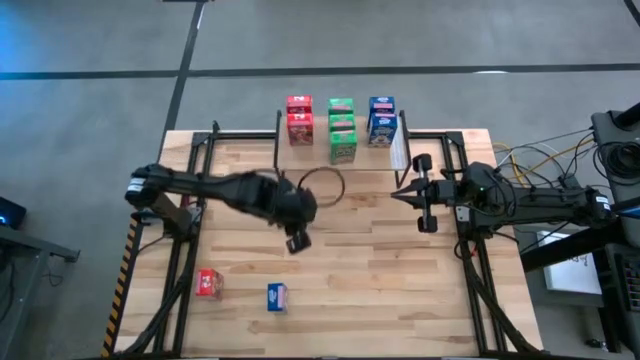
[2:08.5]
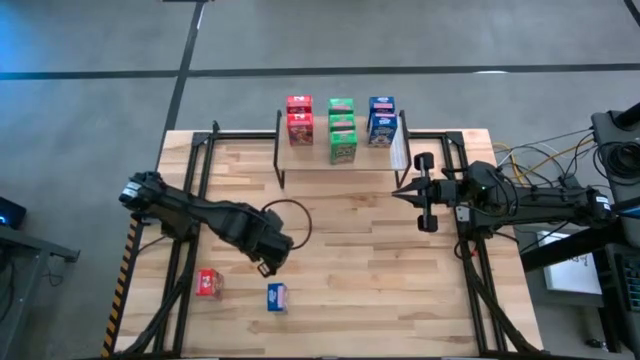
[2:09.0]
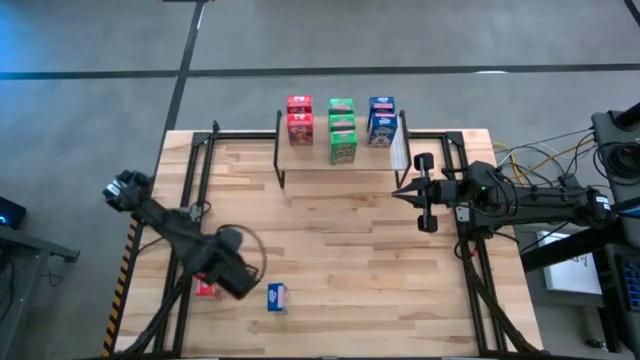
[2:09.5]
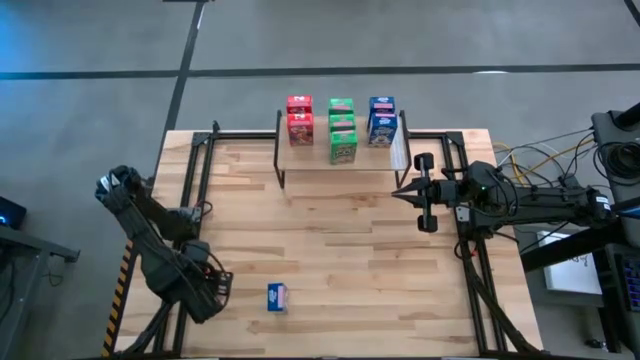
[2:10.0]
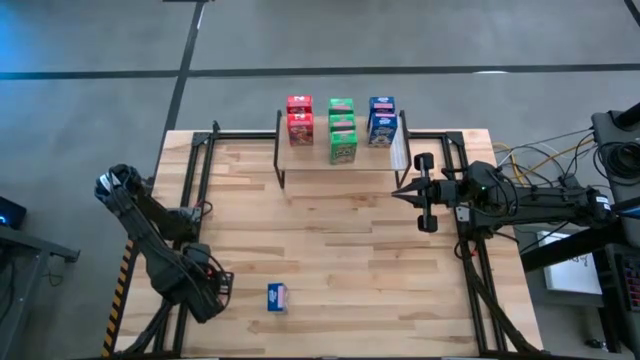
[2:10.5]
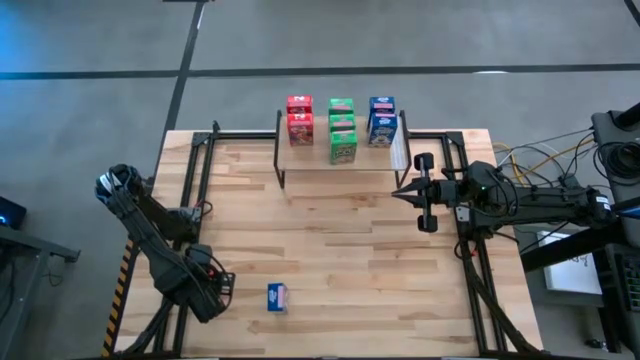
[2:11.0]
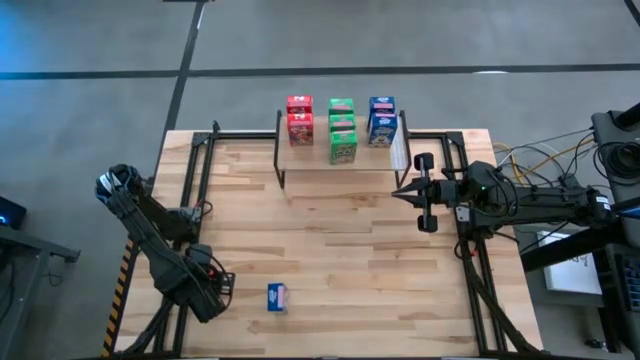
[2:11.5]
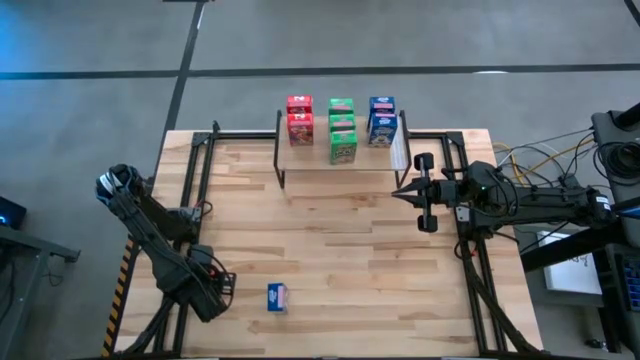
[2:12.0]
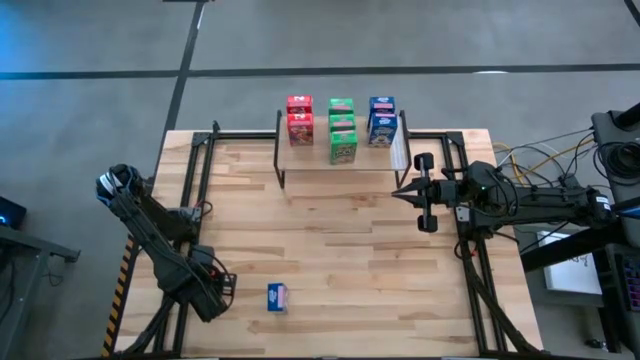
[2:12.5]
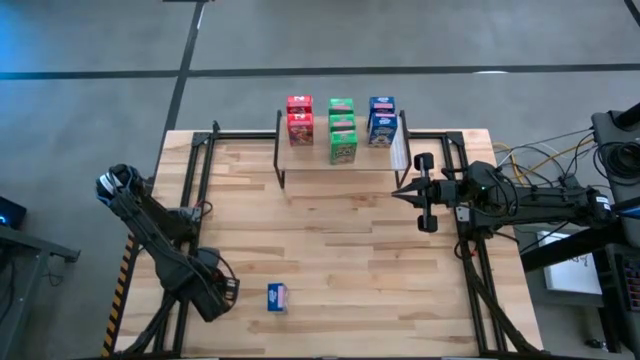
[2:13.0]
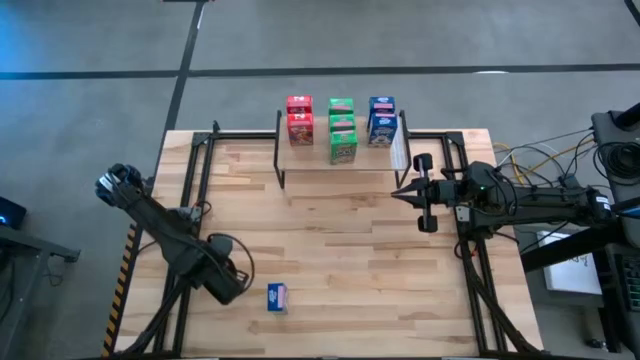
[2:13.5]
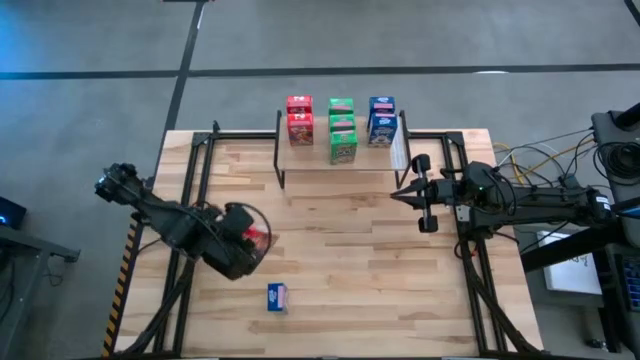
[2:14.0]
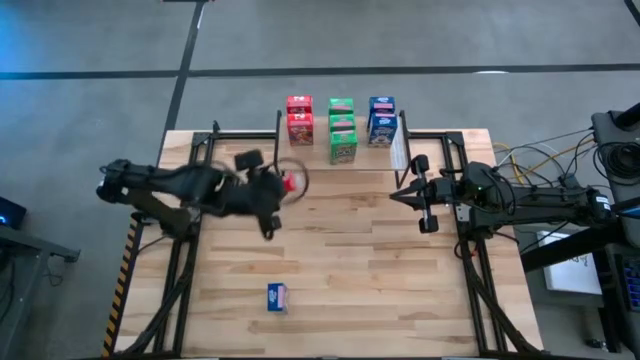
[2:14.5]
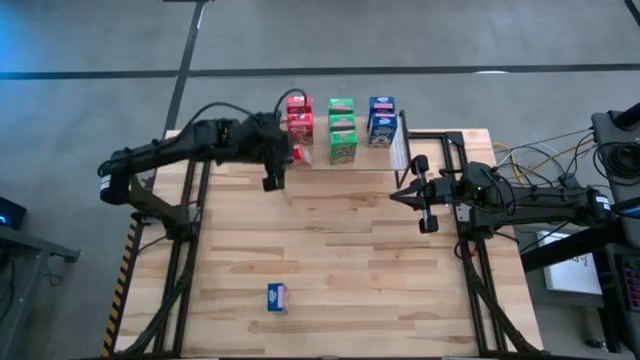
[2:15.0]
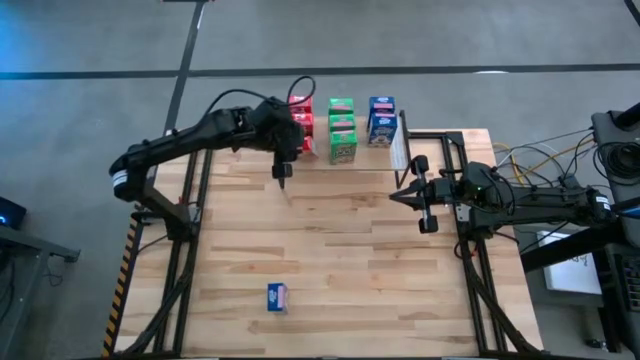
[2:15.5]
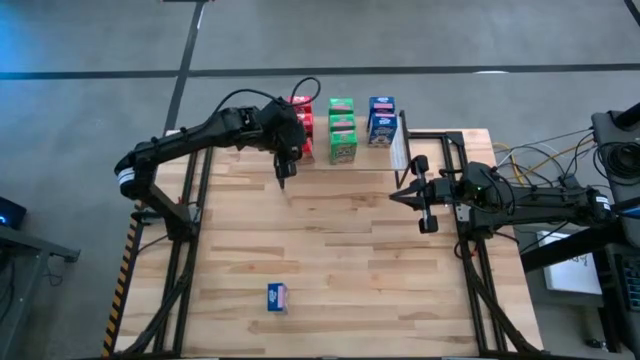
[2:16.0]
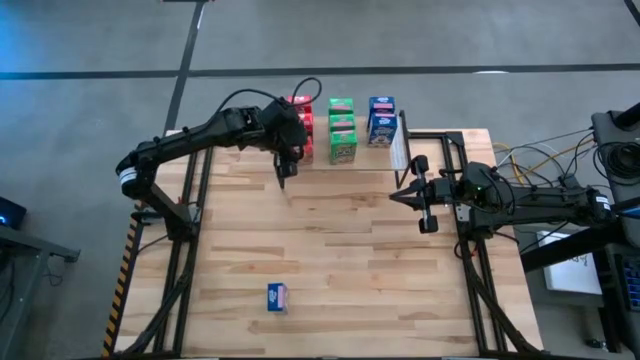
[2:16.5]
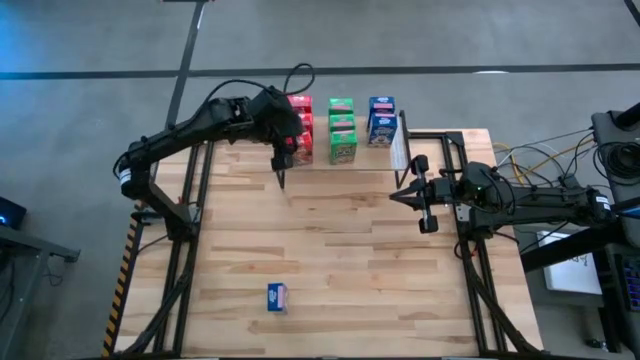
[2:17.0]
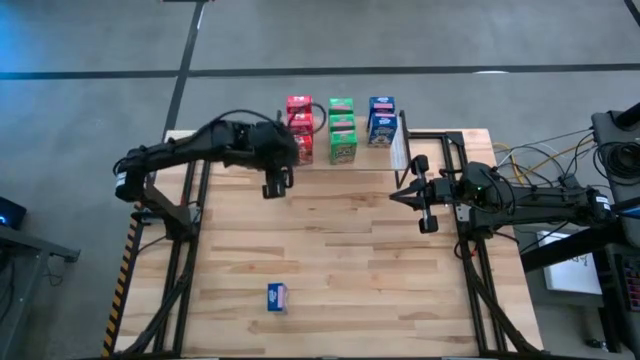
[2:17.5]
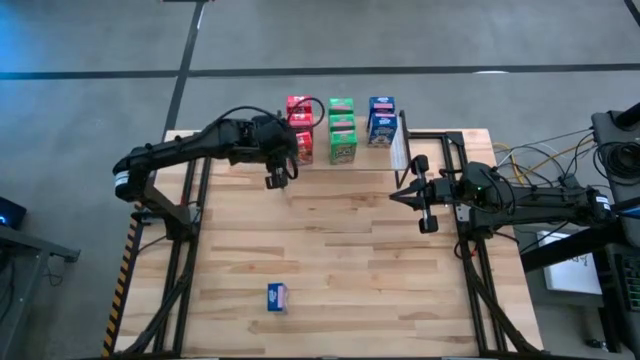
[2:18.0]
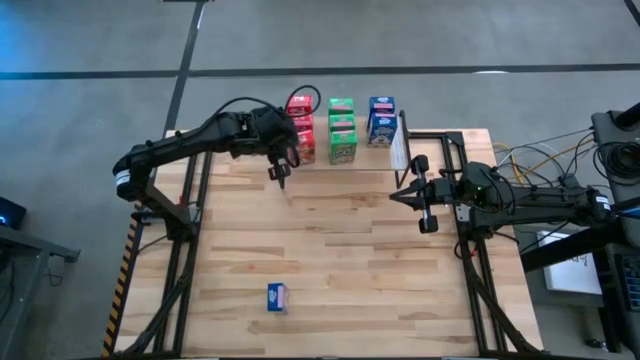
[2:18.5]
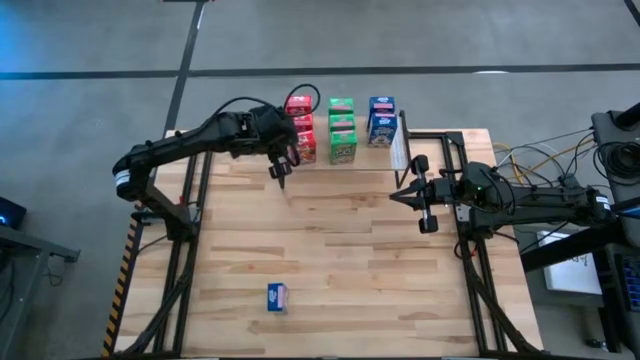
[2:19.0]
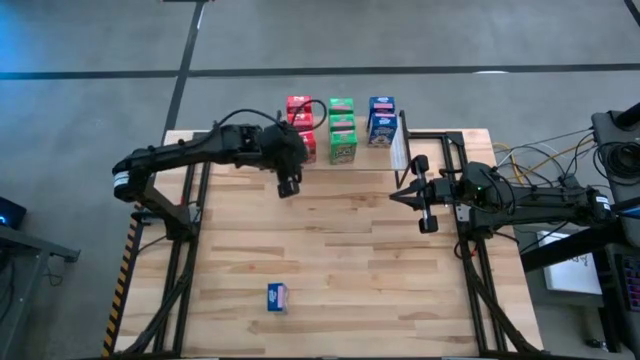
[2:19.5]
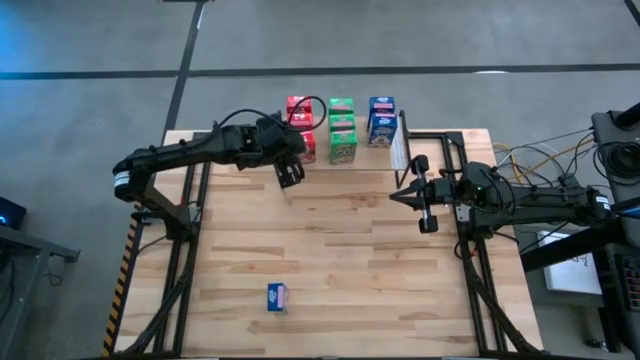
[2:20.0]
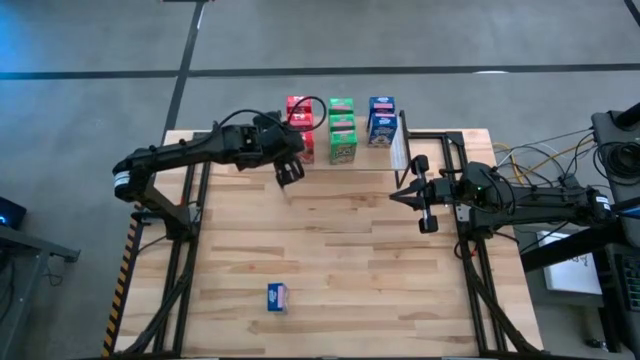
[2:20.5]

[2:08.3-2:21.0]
Task: Stack cereal on shelf
Put the red cereal box on the shelf

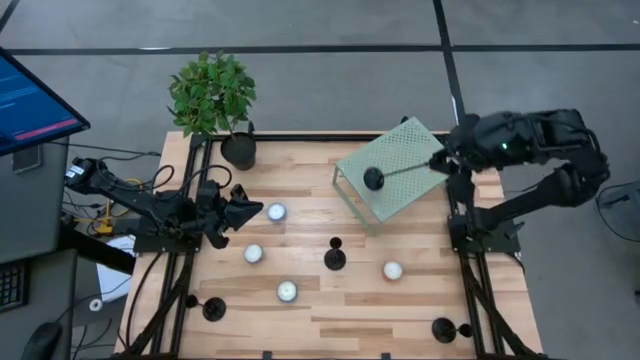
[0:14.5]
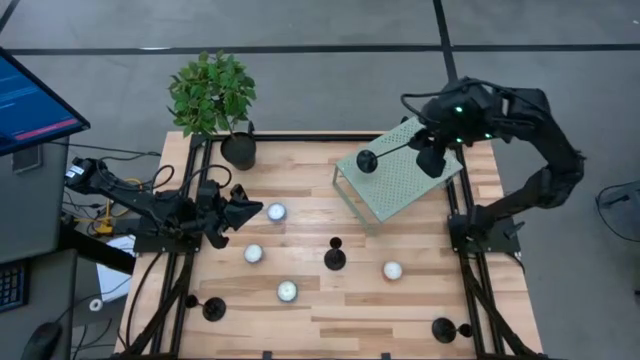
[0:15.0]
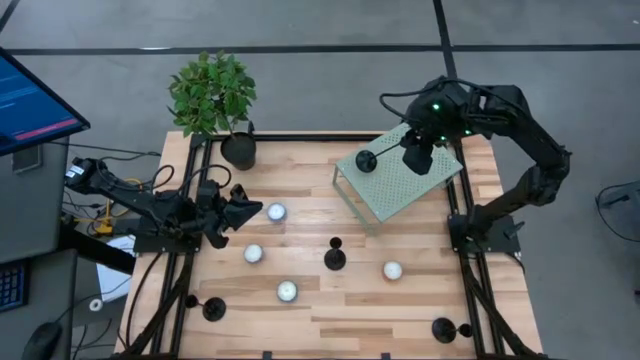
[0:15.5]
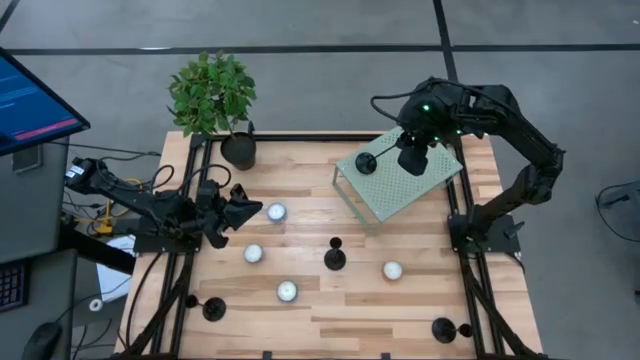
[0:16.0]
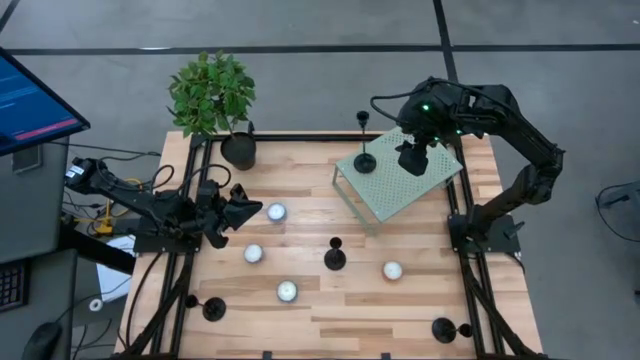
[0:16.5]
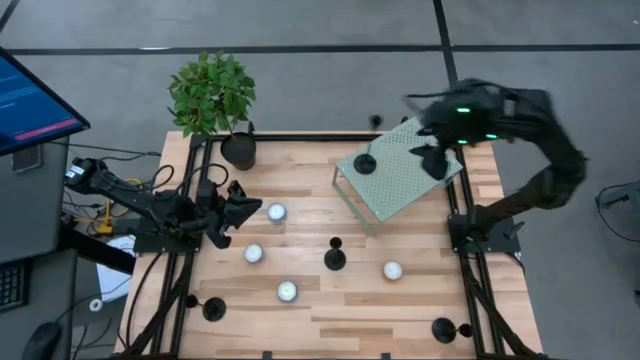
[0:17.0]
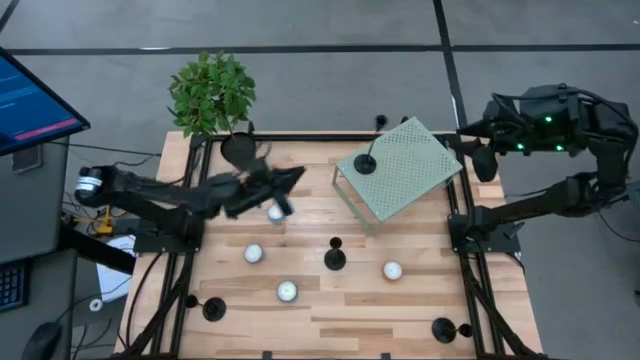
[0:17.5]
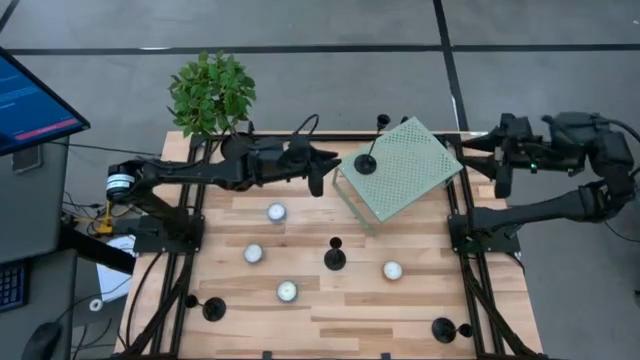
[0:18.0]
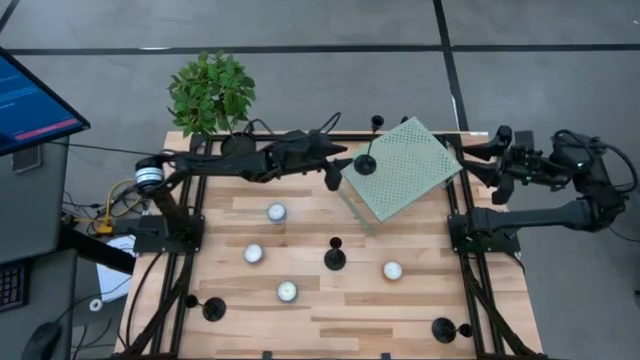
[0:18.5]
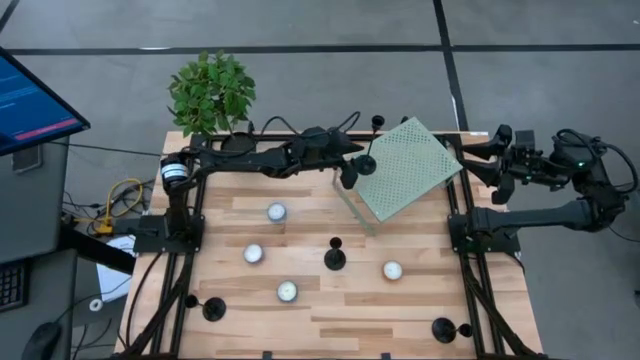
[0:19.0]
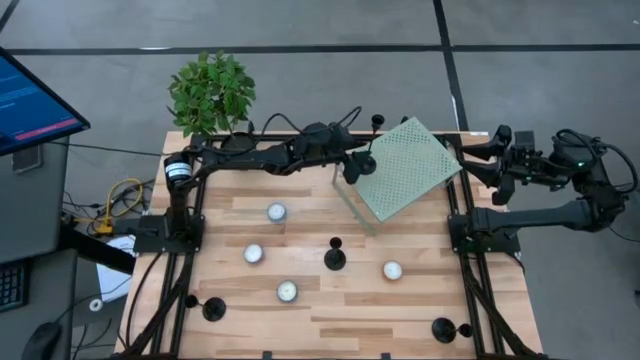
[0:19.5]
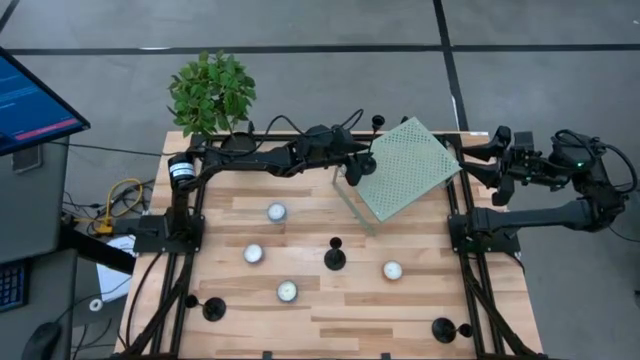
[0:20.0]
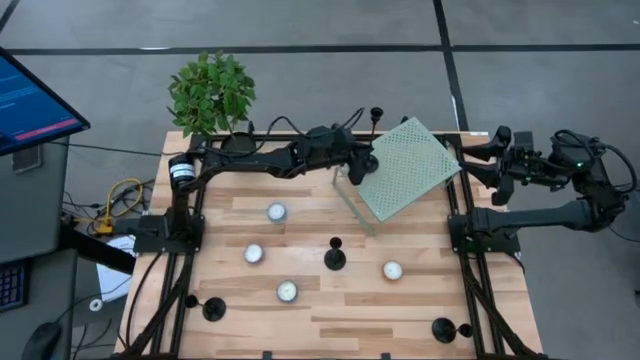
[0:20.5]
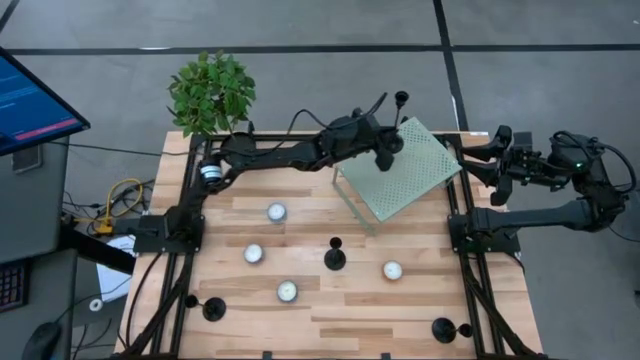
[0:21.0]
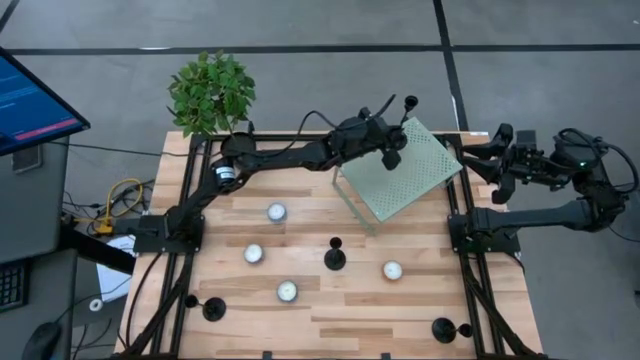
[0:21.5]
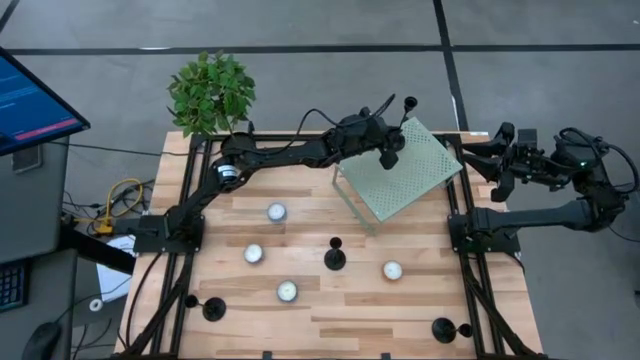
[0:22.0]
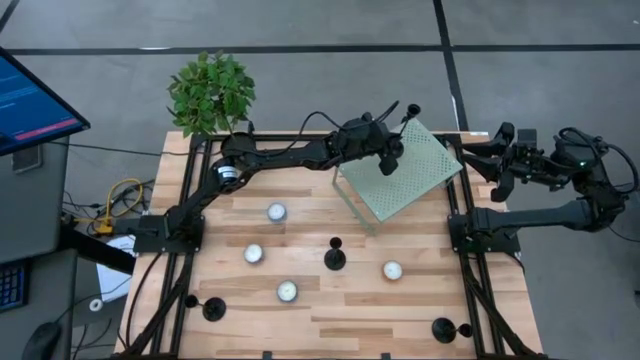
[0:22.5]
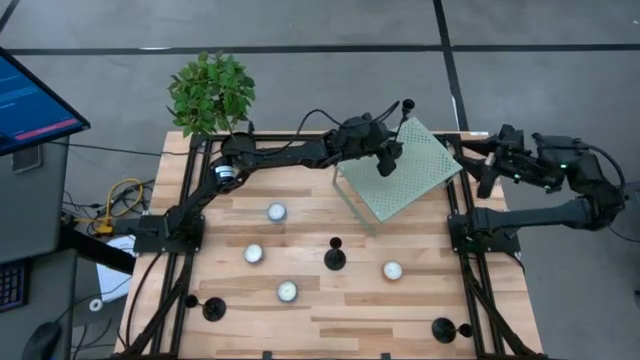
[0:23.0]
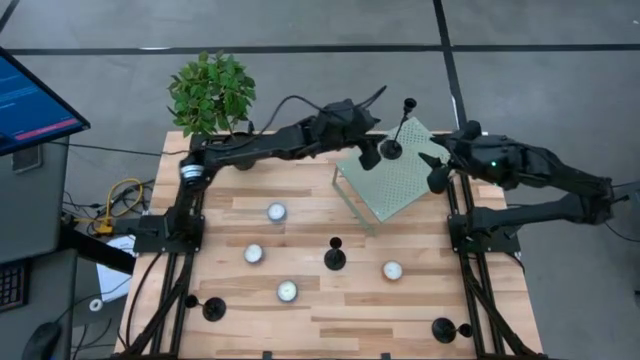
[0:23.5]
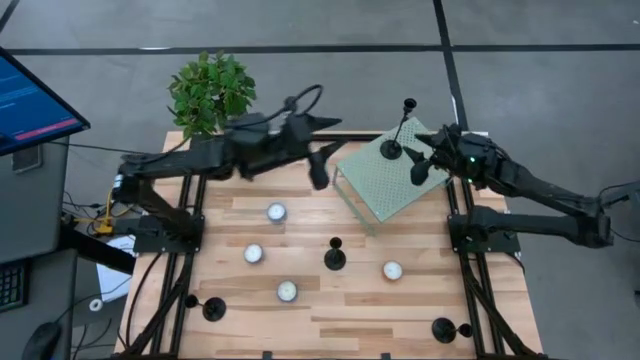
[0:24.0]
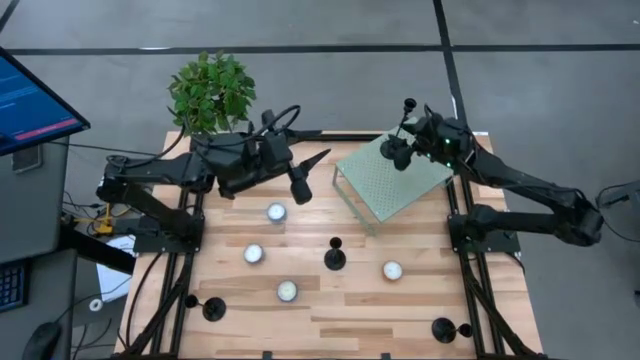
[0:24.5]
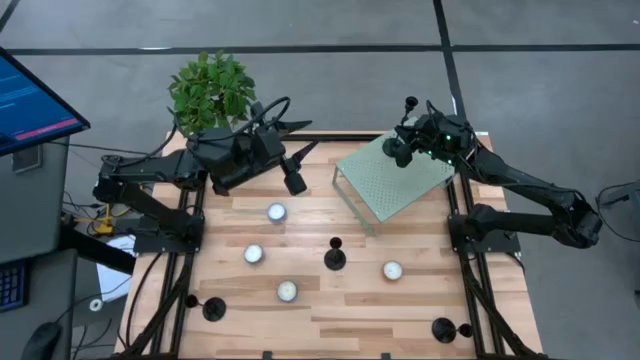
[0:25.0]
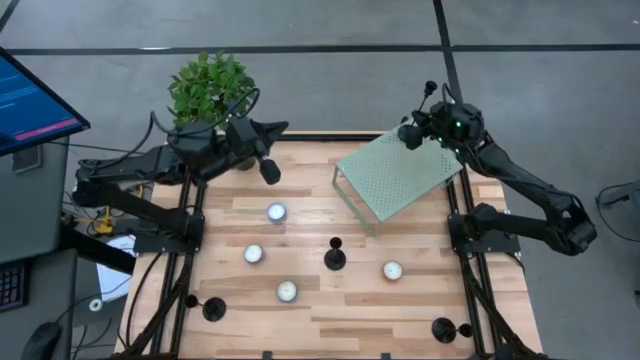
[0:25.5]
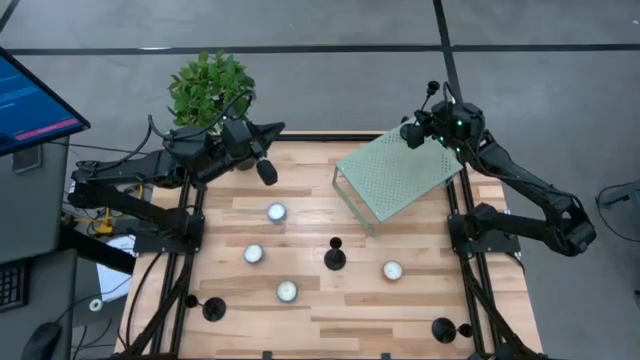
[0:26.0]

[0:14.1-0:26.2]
Task: Pick & Place candle stick holders
Put the black candle holder on the shelf
